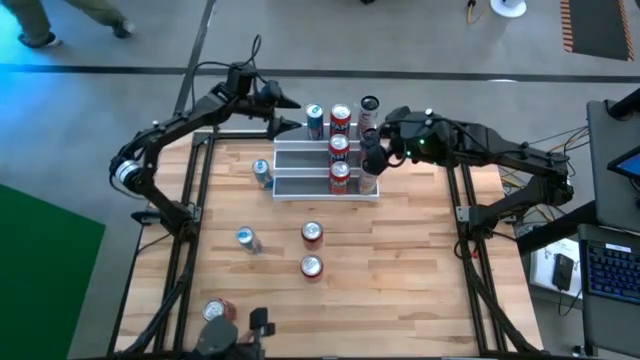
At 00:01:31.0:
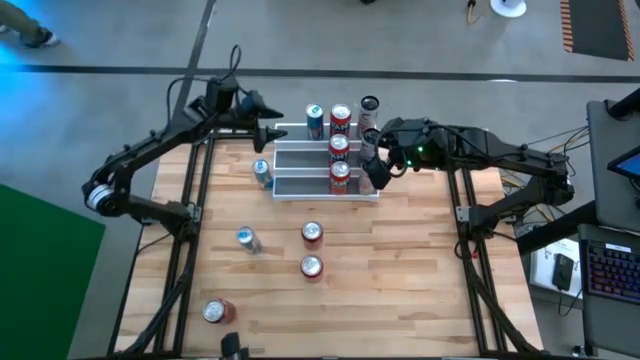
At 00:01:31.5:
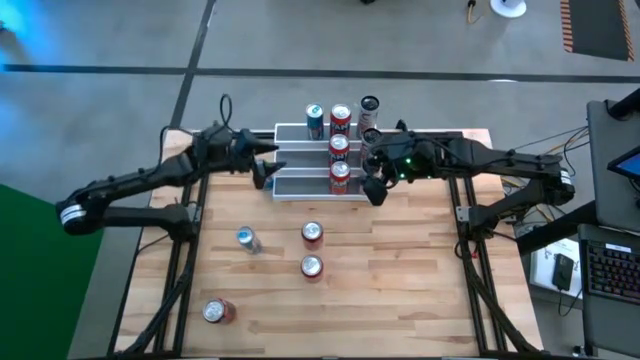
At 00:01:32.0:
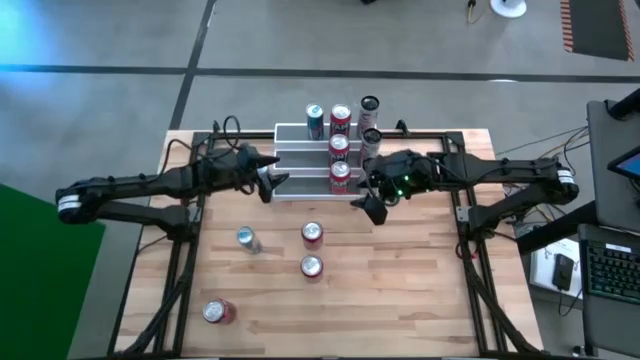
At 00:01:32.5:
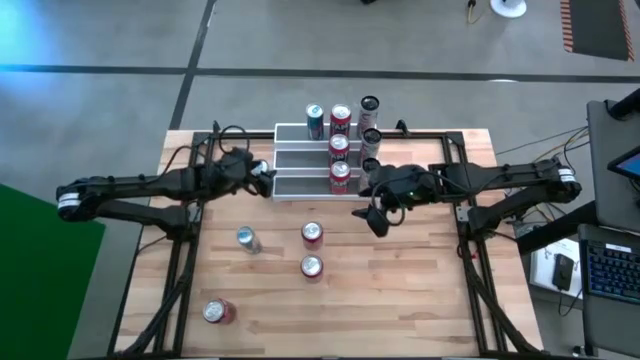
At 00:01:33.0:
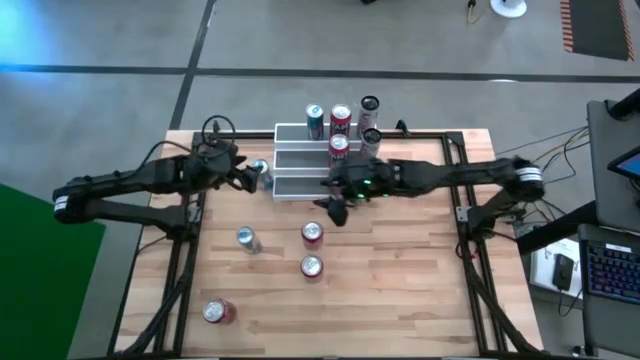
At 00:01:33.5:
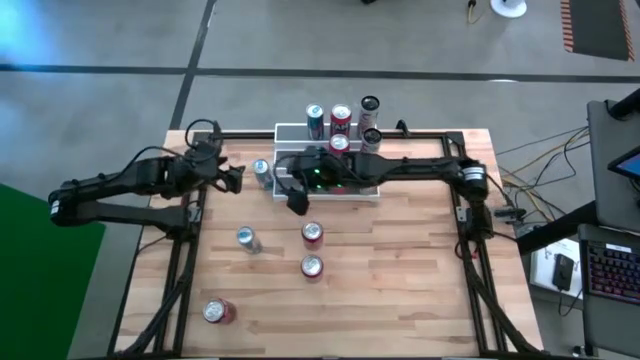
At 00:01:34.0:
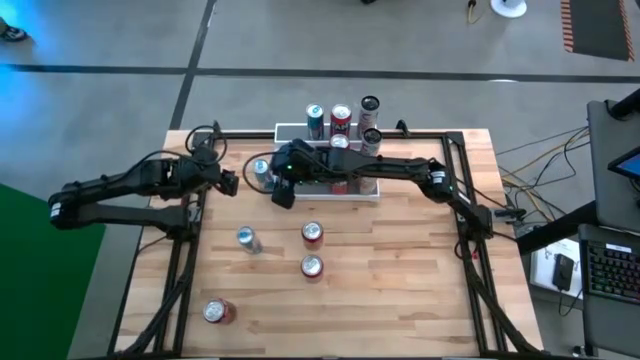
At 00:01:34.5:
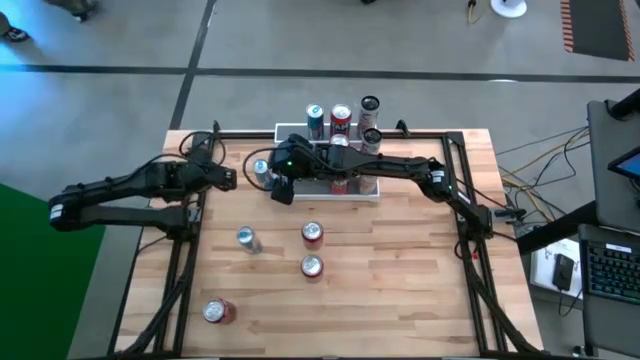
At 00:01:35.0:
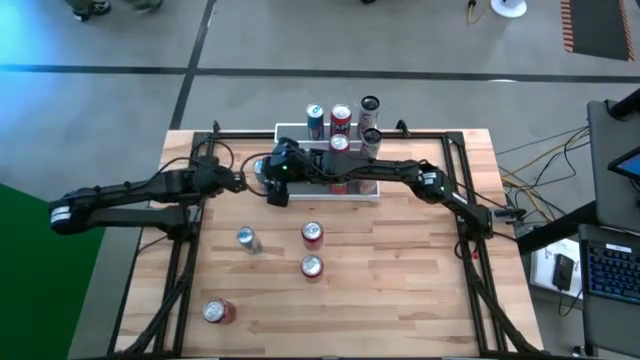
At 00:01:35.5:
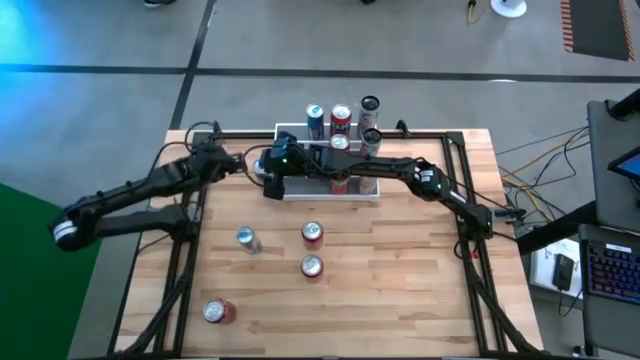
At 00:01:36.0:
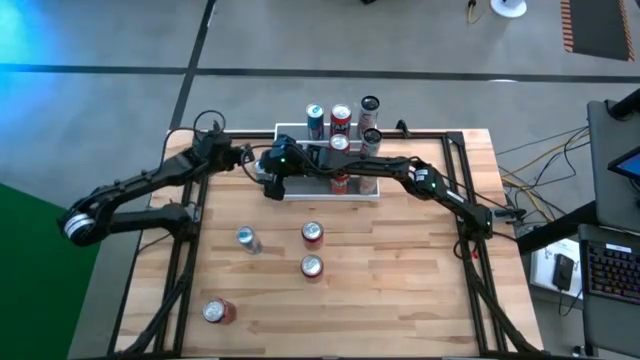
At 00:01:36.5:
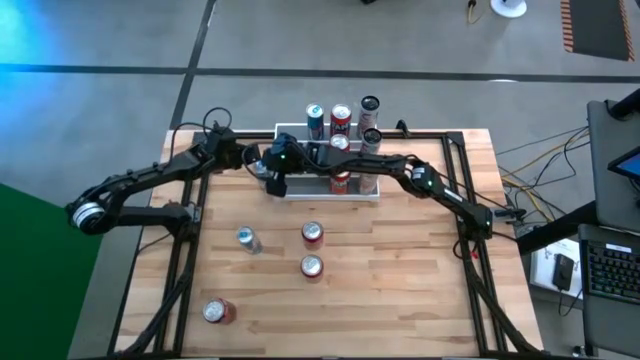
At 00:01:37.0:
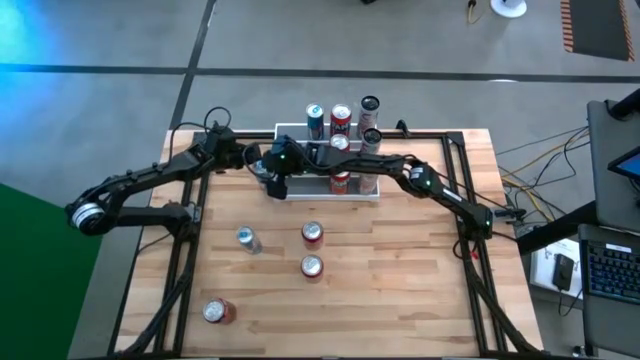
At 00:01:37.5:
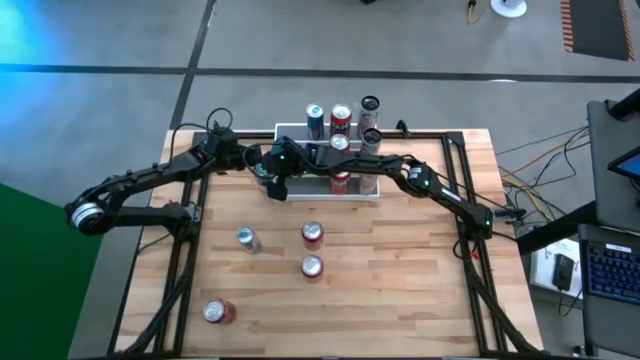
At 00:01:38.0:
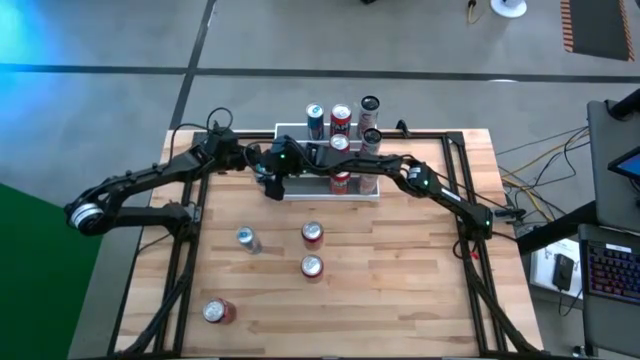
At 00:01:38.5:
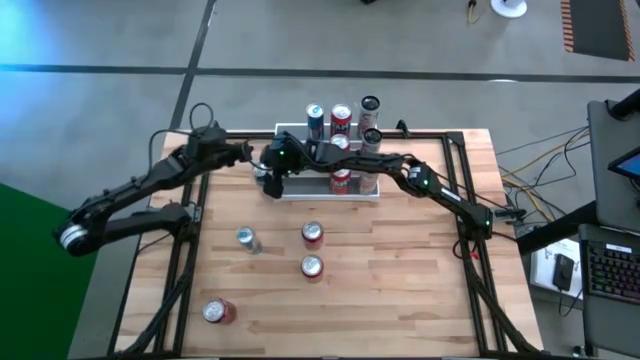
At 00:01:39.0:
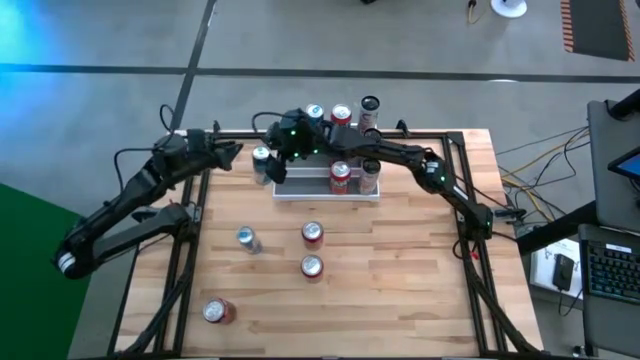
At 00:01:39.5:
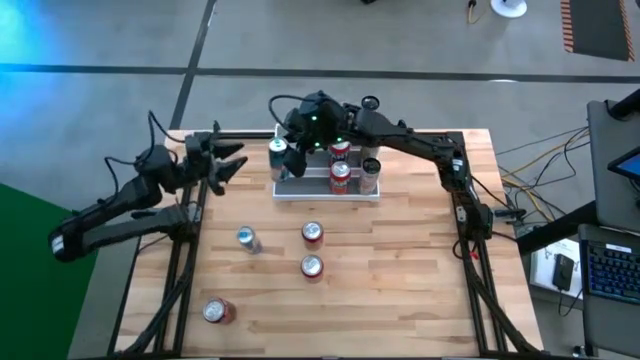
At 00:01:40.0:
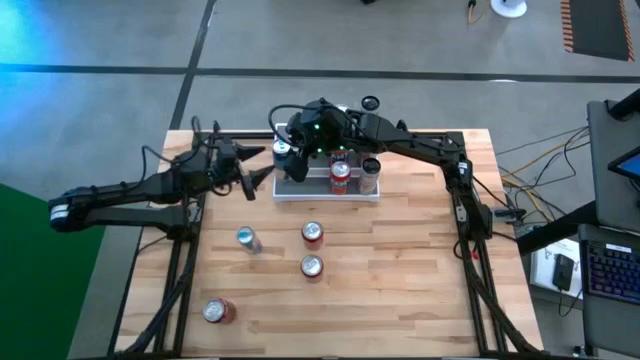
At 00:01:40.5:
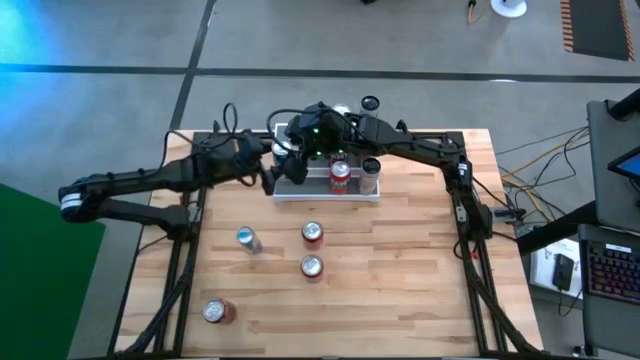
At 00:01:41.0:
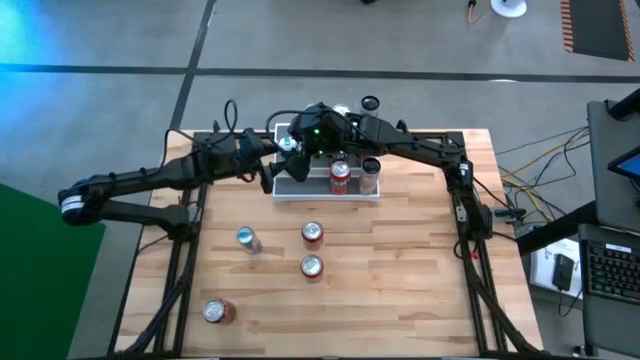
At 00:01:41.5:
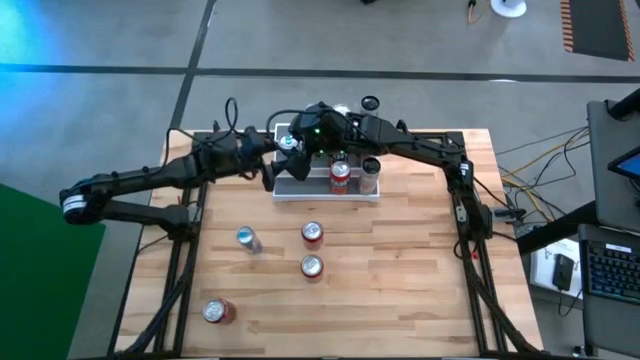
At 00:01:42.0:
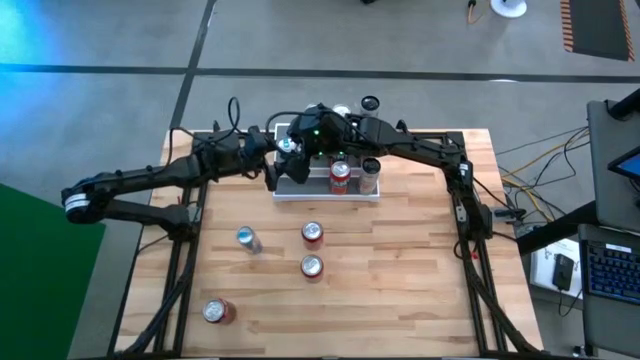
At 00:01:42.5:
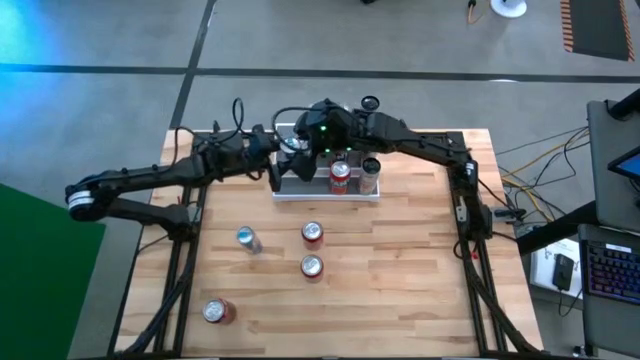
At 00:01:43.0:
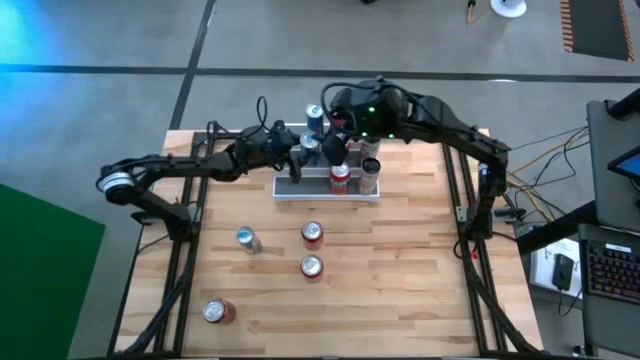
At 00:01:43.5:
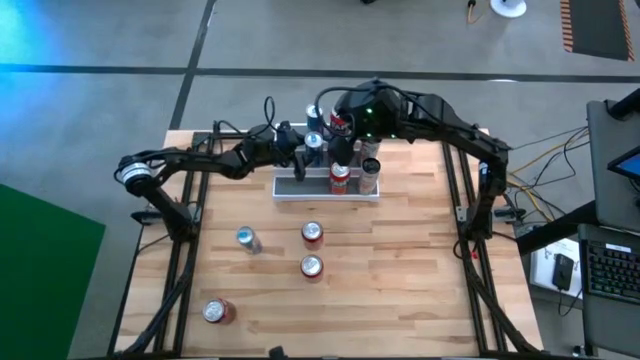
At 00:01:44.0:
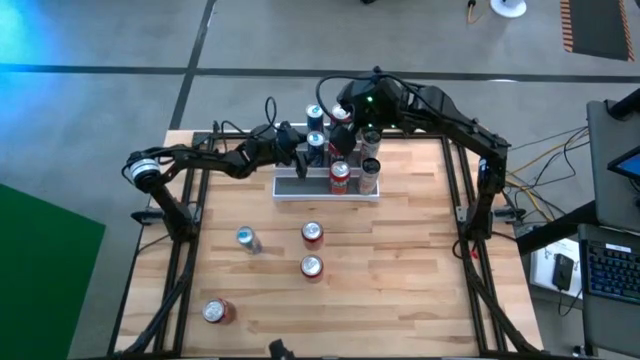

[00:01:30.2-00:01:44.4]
Task: Place canned beverage on shelf
Put the top blue soda can on the middle tier of the shelf aligned with the other blue soda can

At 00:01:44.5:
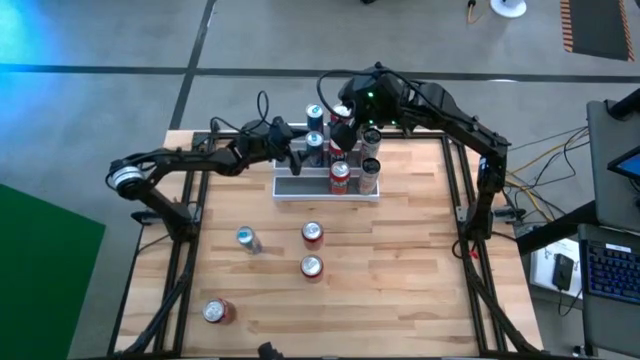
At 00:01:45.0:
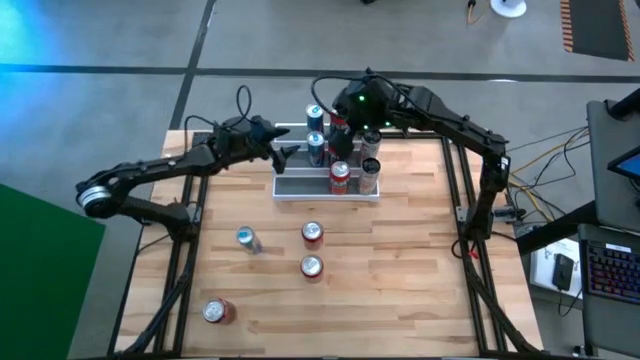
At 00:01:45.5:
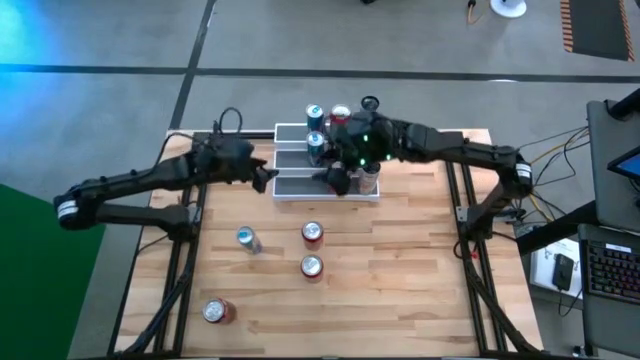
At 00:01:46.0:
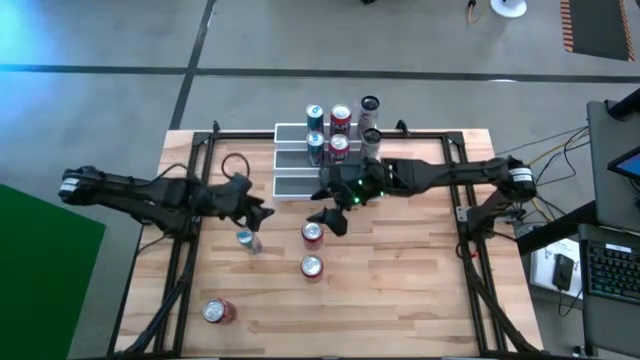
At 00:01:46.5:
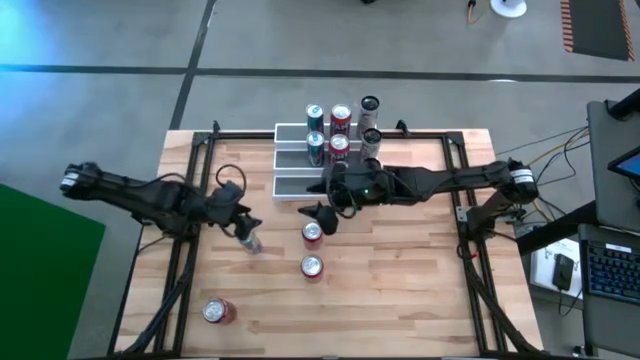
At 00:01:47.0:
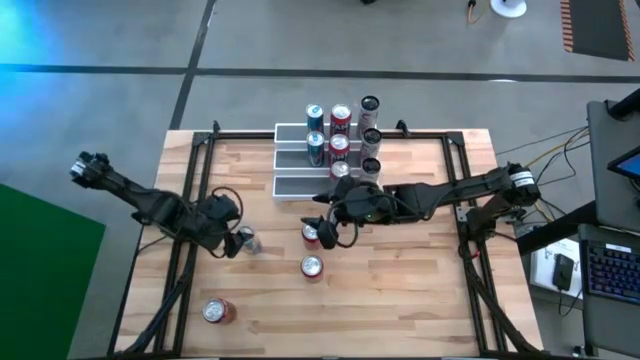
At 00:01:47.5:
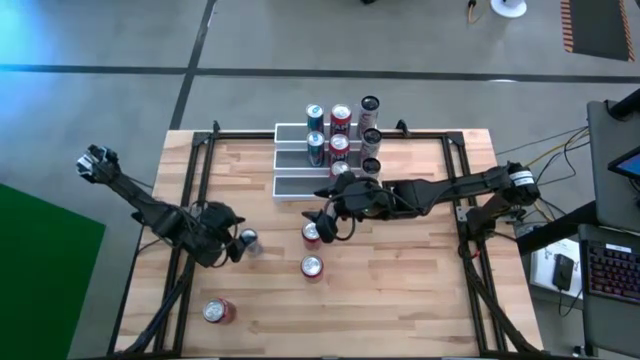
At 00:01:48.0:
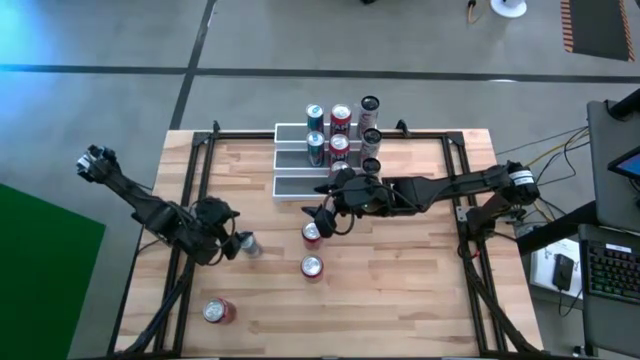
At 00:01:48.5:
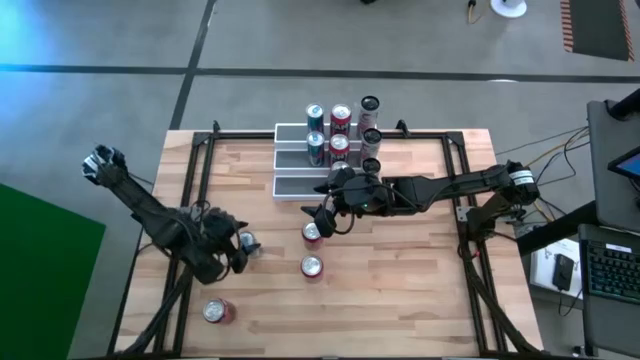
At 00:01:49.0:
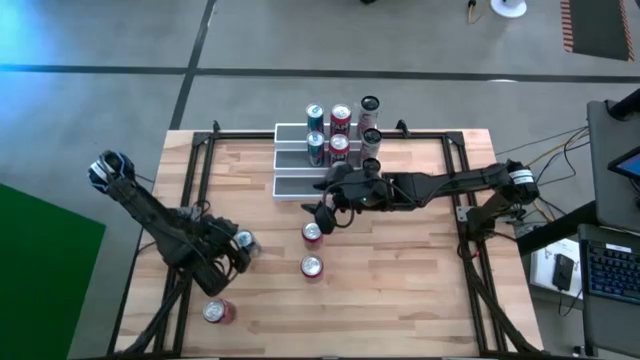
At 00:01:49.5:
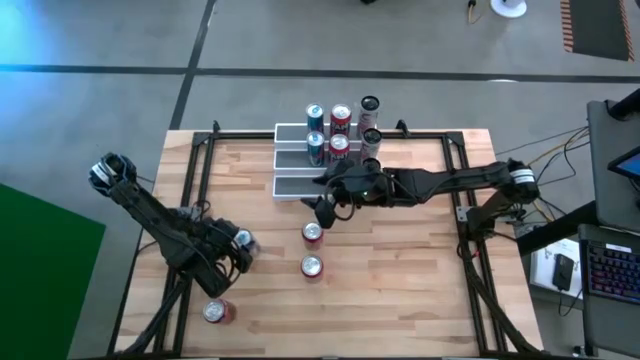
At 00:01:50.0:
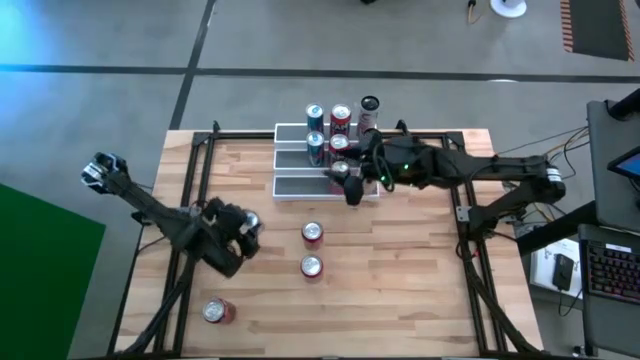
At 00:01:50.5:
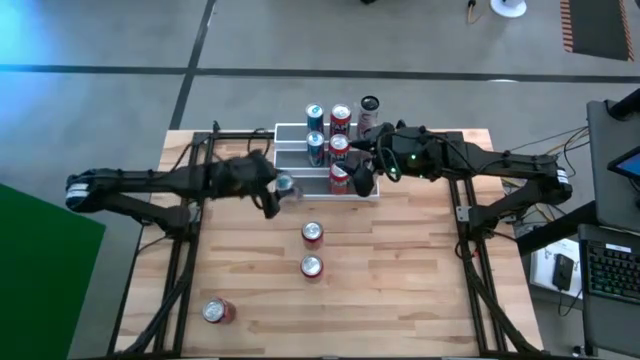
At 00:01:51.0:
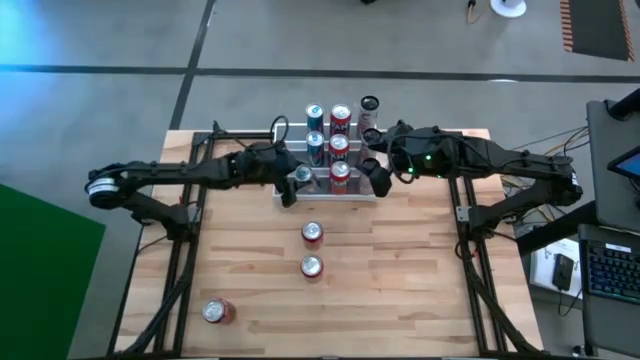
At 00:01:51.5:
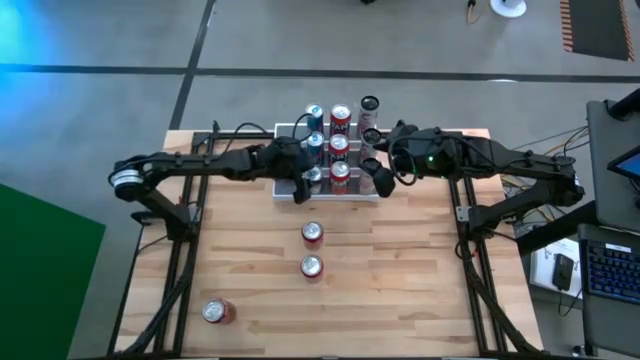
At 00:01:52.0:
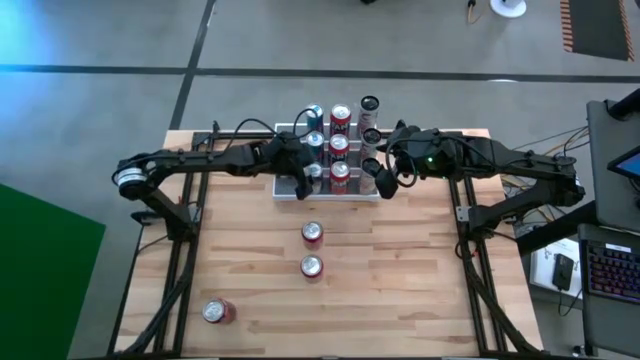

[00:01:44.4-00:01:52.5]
Put the blue soda can on the bottom tier of the shelf aligned with the other blue soda can
